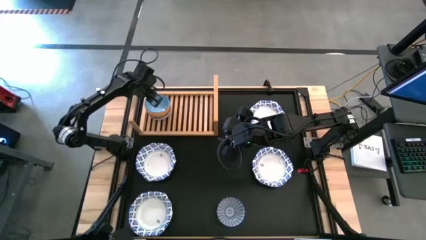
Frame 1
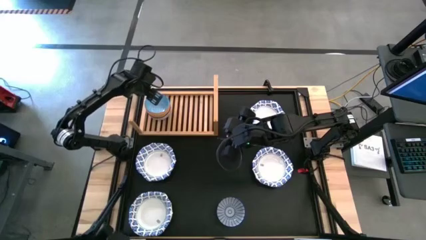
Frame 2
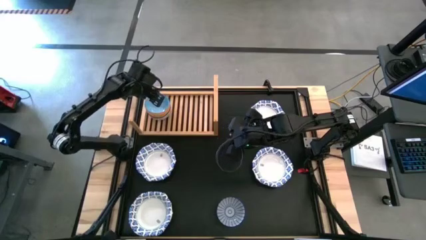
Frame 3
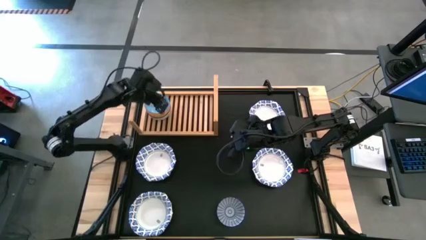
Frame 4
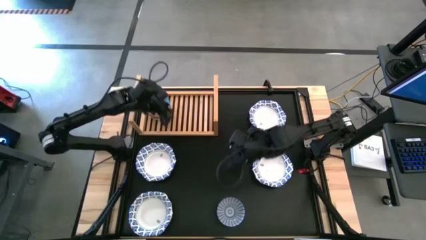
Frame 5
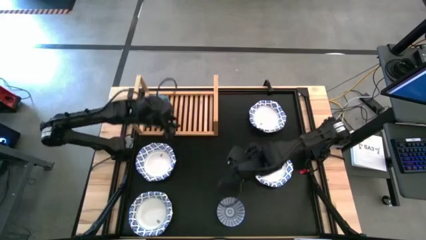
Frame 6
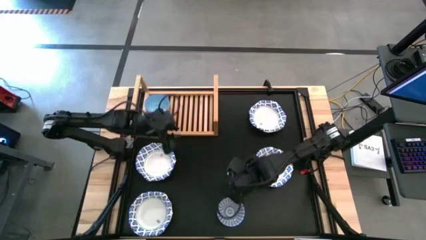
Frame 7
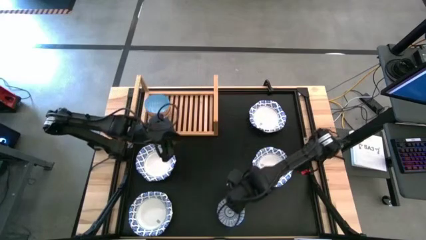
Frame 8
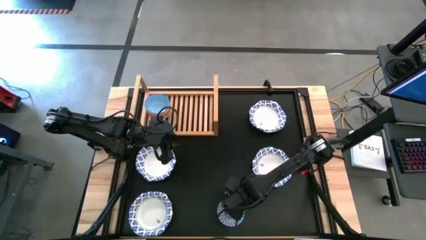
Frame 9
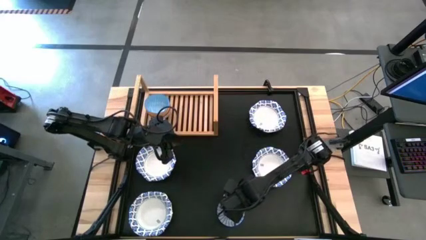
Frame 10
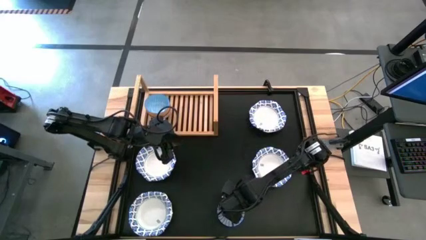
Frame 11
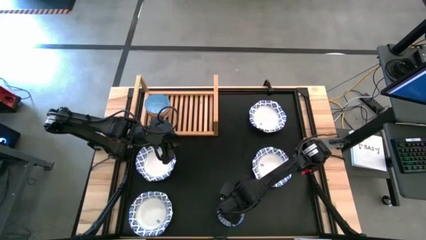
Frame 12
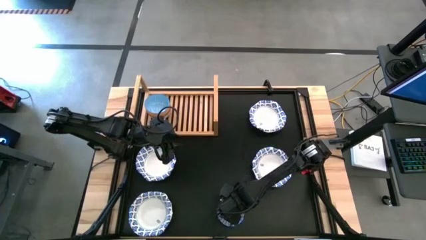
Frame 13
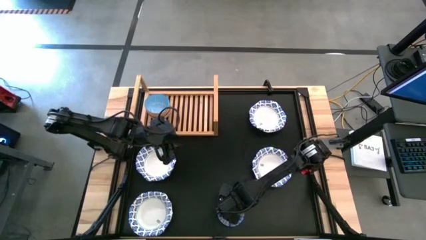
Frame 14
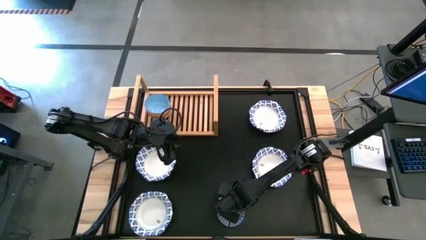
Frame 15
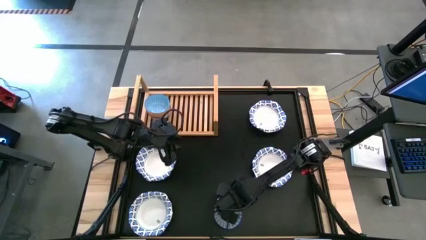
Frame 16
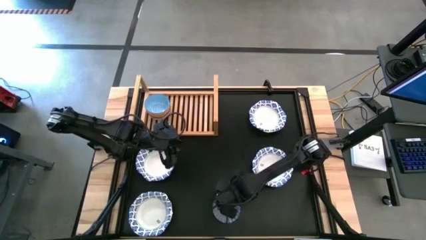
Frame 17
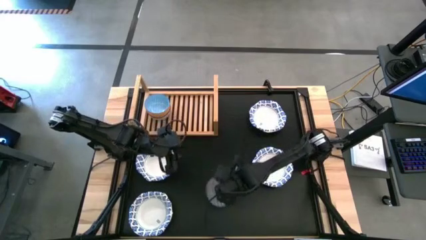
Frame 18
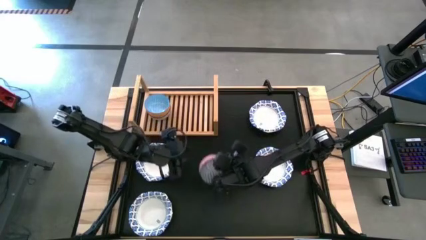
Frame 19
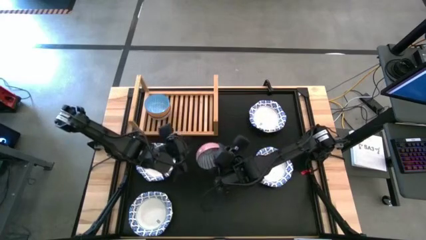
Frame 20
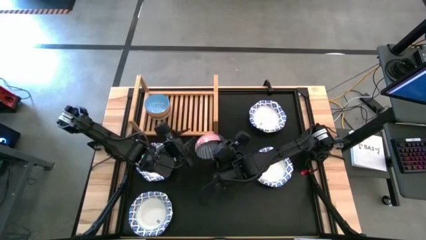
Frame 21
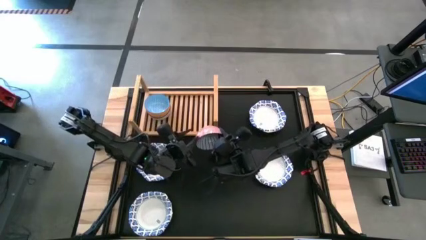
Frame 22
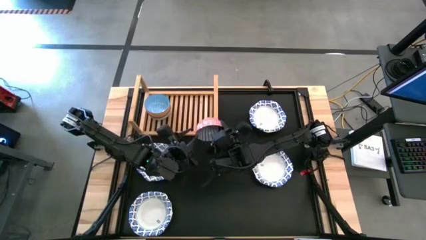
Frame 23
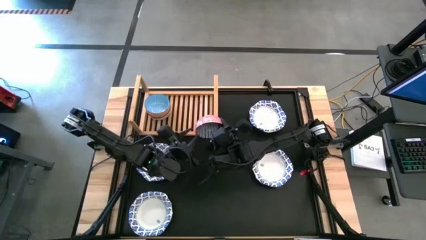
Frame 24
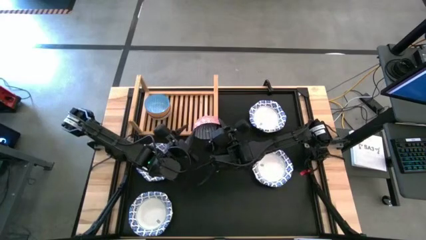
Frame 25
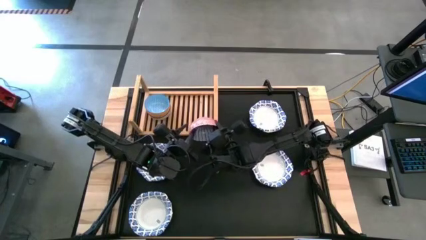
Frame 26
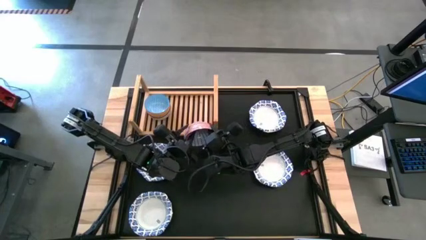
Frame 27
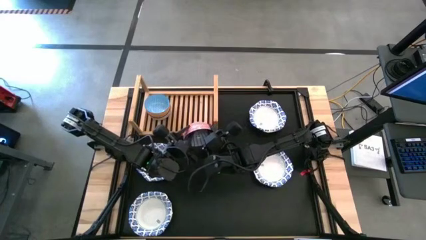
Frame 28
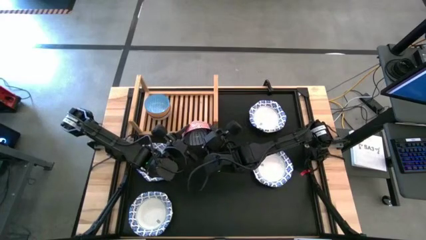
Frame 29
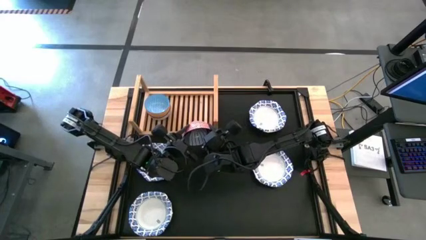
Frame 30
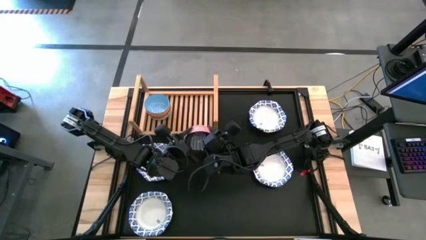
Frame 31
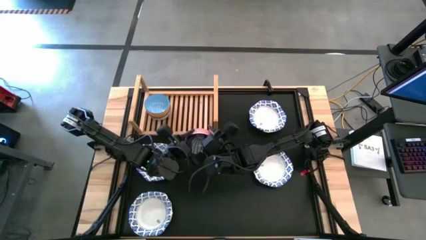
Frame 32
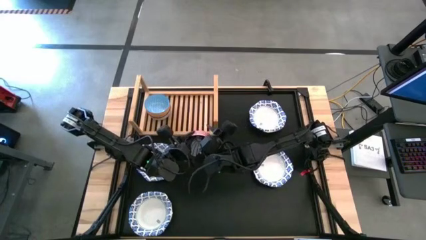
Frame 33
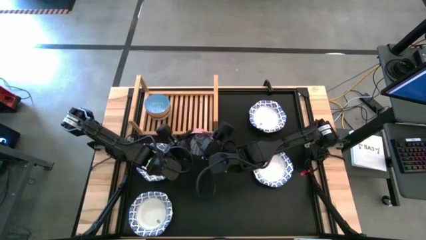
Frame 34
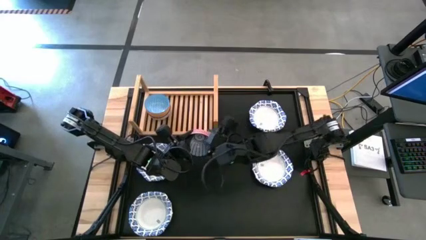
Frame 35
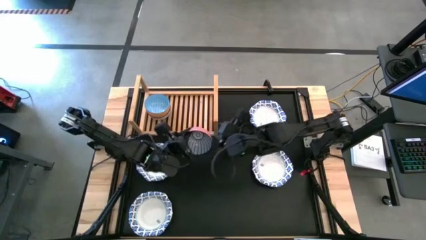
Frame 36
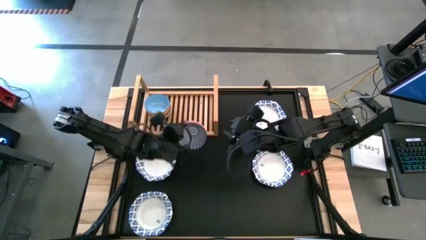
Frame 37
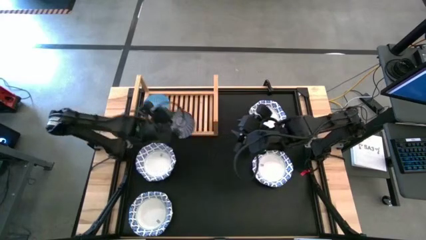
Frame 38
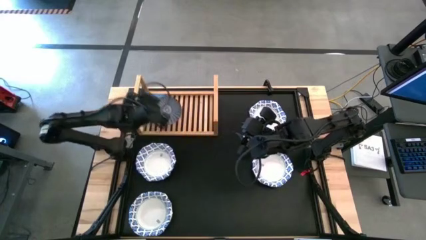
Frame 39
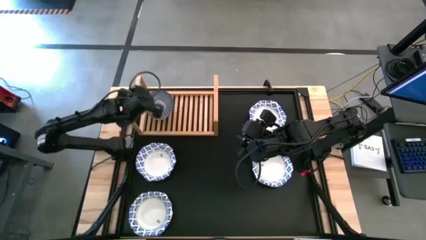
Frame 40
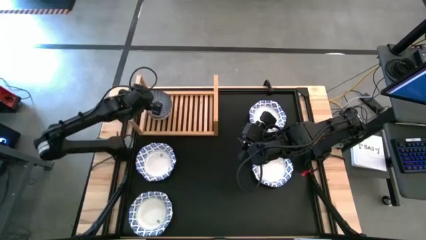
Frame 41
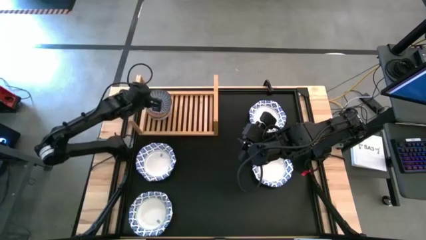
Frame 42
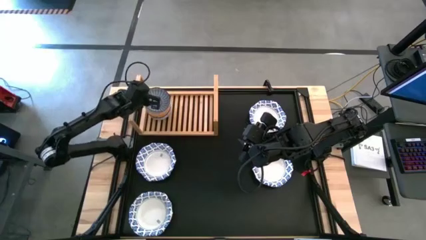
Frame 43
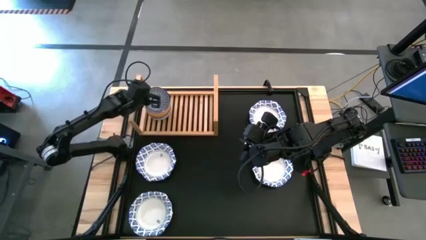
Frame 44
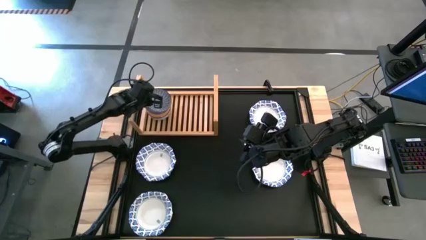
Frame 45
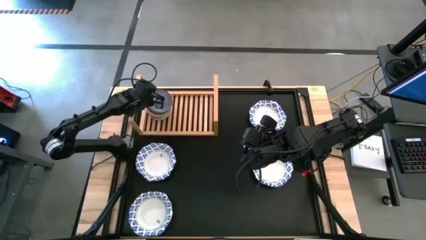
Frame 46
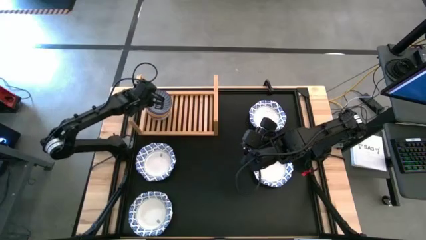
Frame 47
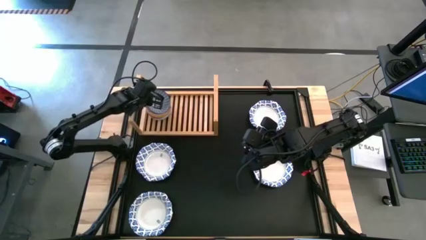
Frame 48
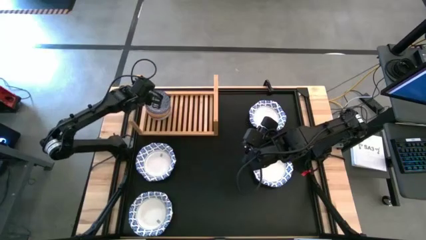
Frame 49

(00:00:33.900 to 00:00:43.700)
Task: Place and stack bowls onto a shelf
Stack the patterned blue bowl on top of the patterned light blue bowl on the shelf

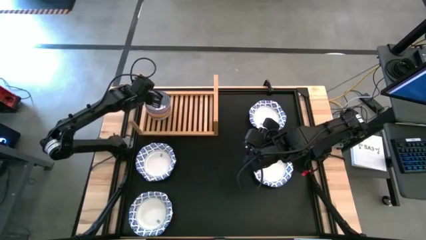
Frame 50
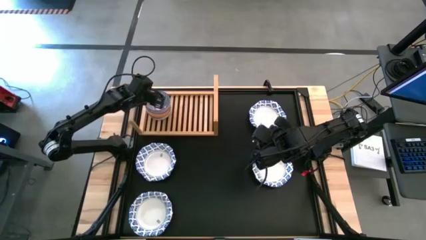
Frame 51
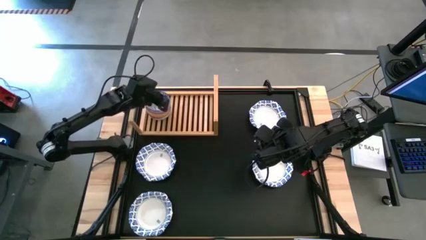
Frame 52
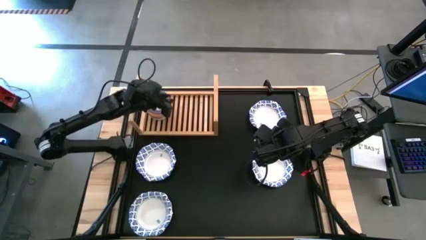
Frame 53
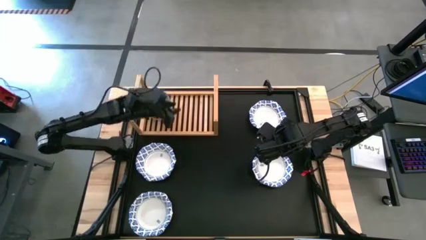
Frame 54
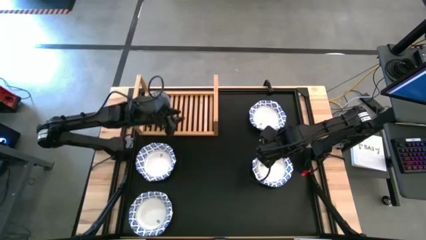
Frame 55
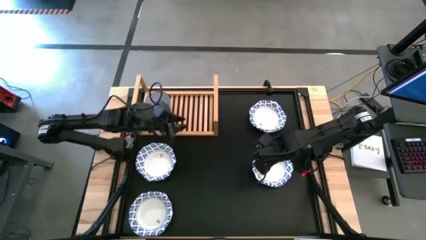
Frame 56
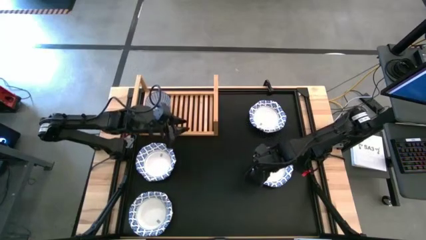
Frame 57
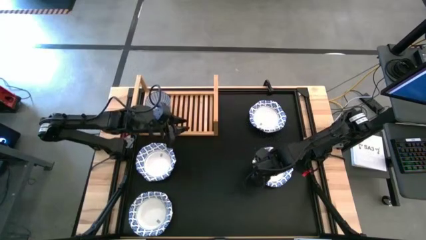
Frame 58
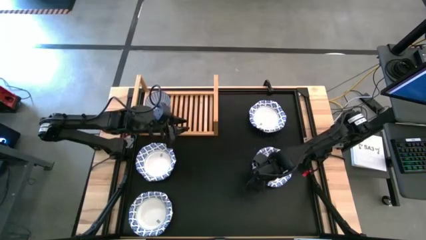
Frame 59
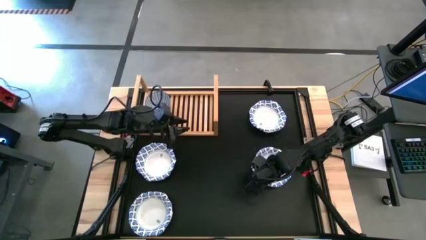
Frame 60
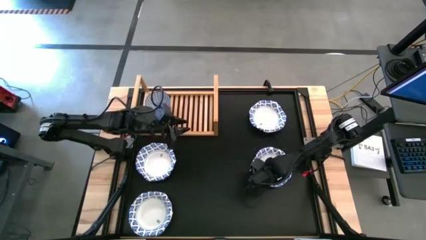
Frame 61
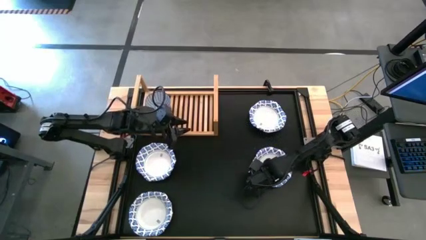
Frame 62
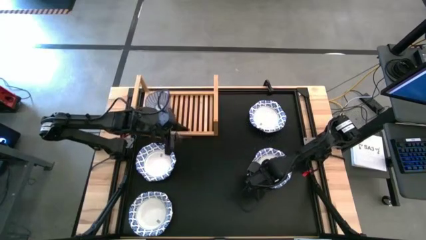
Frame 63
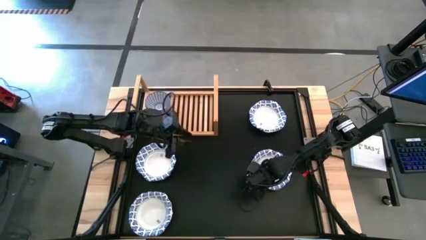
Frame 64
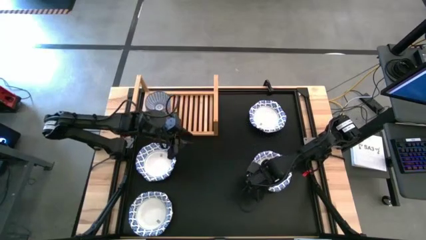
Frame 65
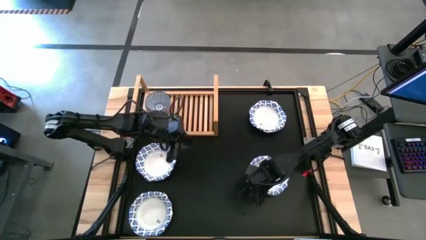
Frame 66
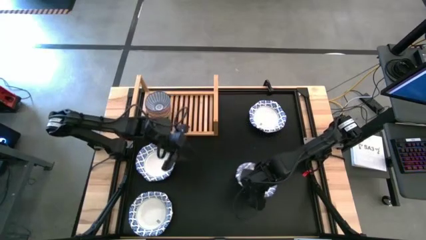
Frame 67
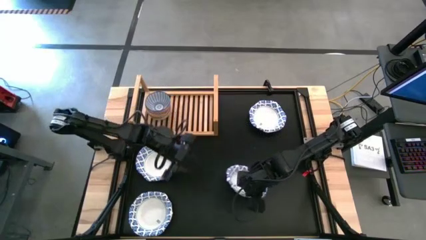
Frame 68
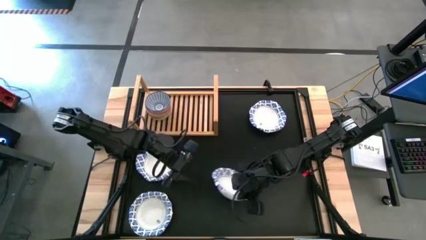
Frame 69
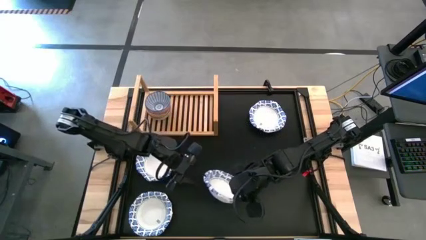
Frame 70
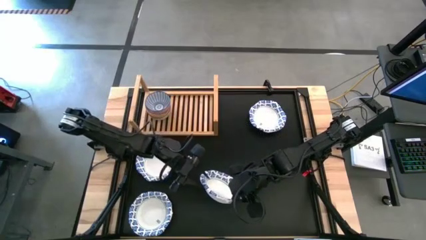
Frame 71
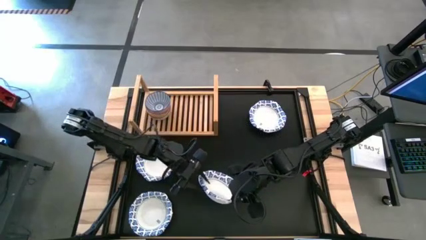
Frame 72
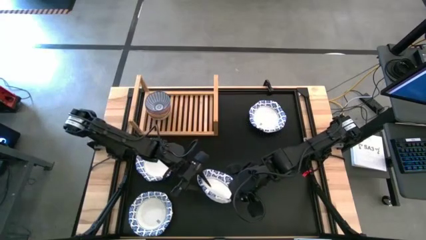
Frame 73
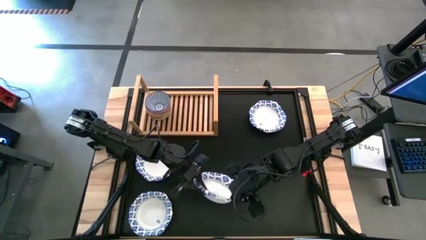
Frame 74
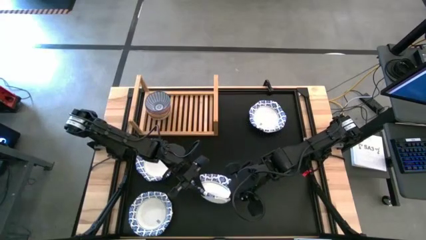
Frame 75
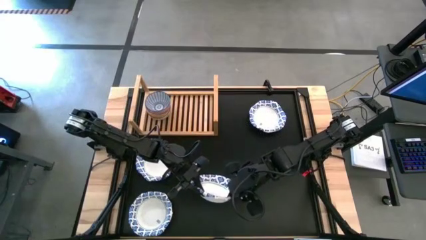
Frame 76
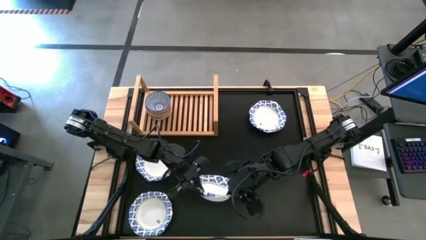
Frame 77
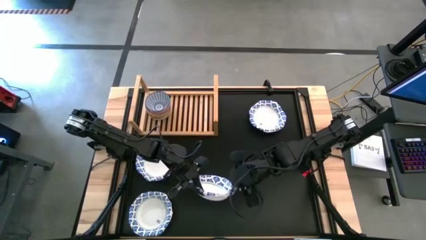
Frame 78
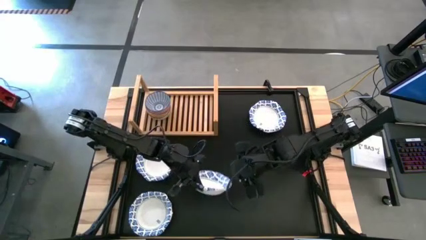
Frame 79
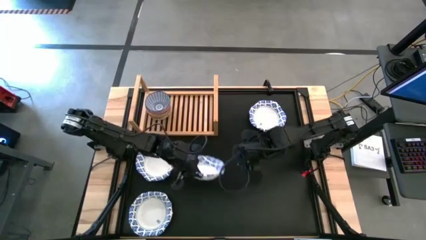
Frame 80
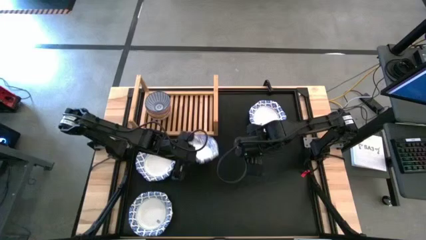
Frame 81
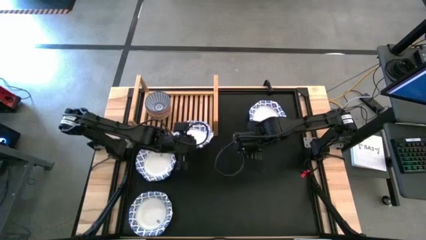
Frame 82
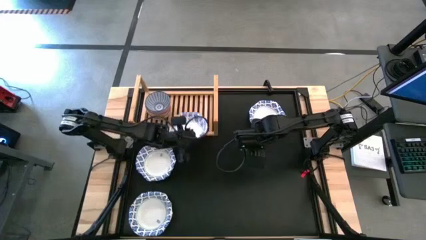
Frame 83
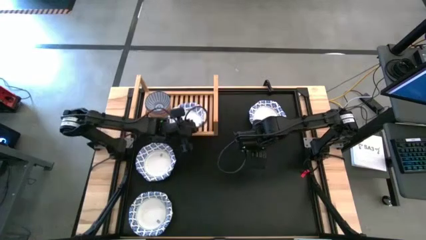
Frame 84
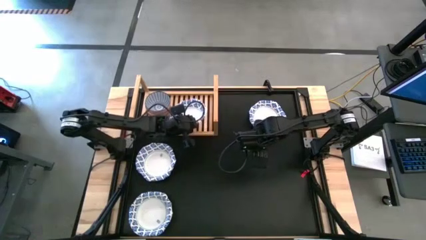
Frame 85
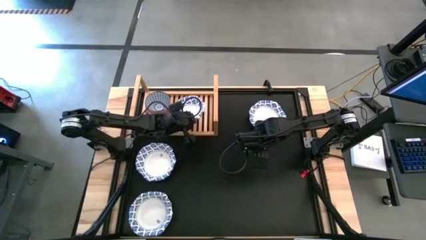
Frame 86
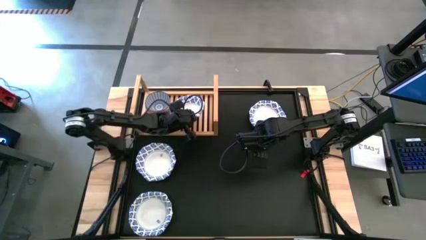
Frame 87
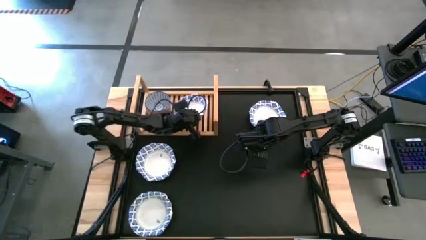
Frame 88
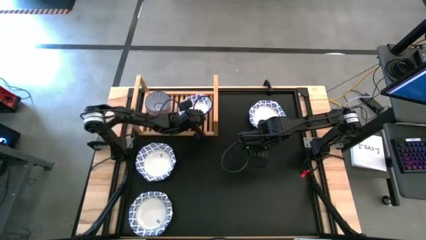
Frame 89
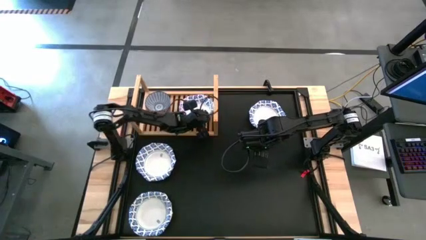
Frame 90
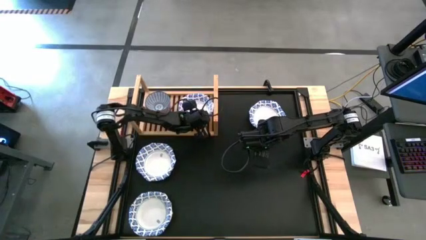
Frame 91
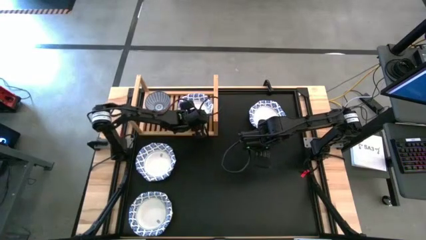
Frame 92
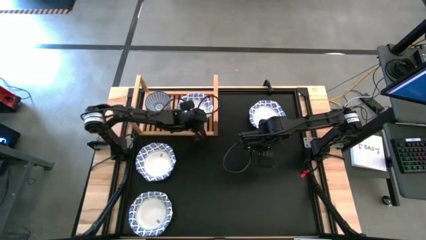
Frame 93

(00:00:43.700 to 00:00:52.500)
Put the white bowl on the shelf
